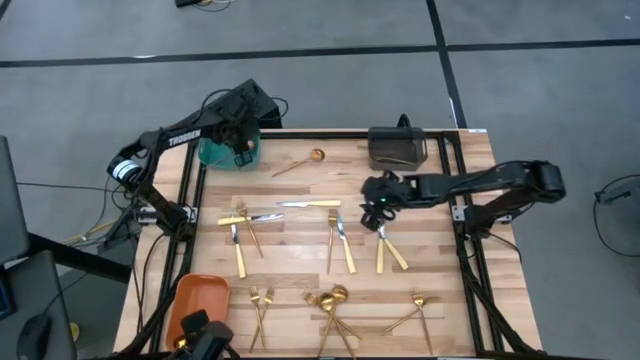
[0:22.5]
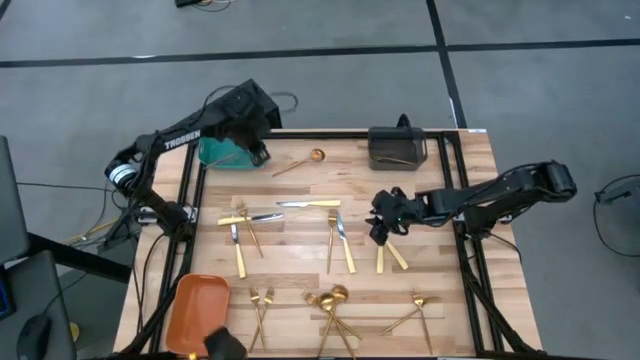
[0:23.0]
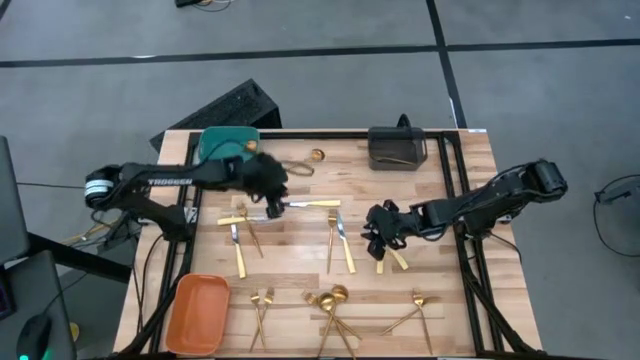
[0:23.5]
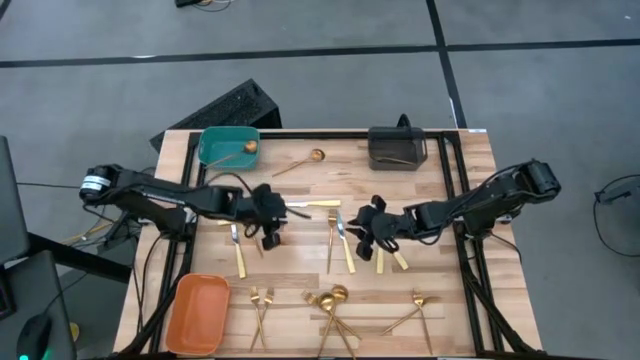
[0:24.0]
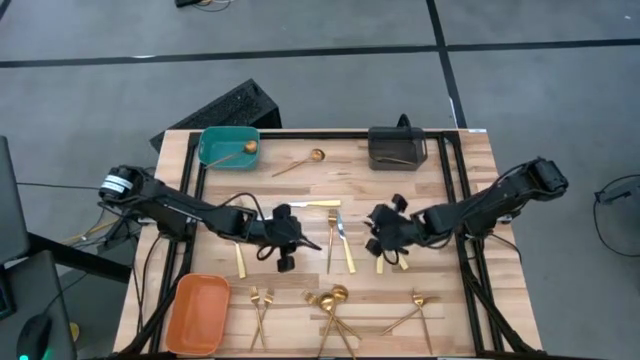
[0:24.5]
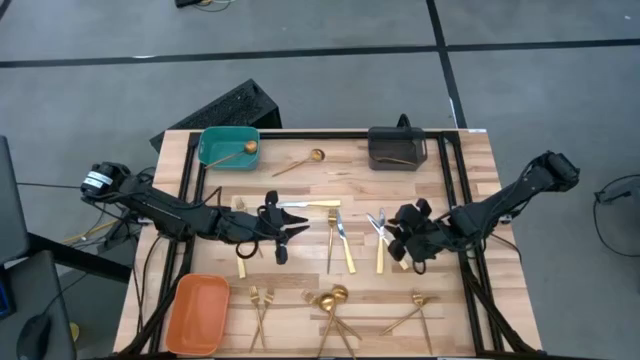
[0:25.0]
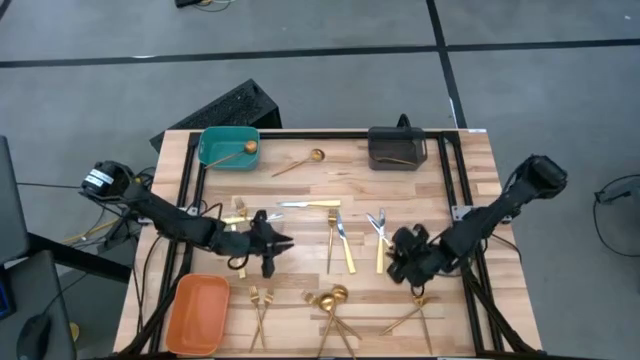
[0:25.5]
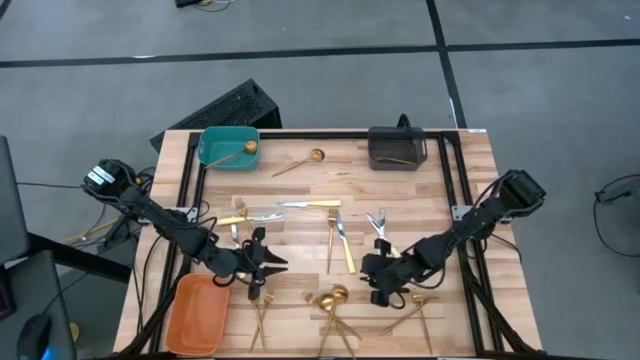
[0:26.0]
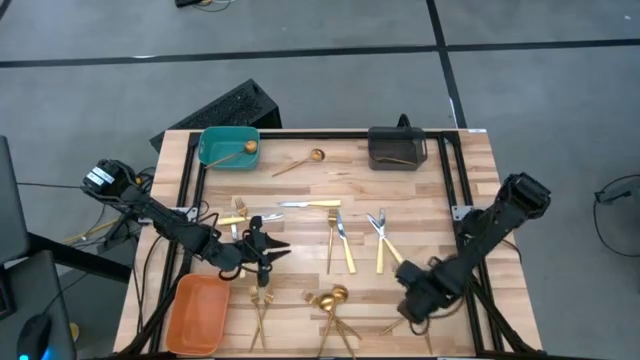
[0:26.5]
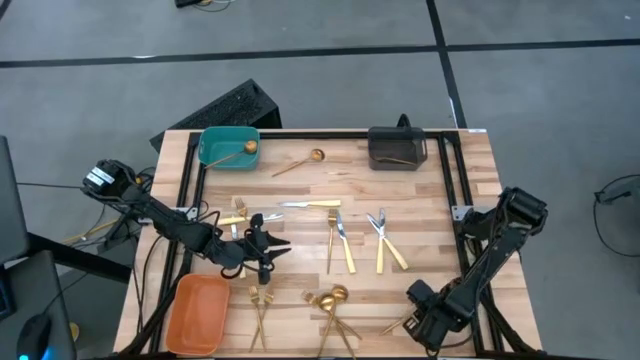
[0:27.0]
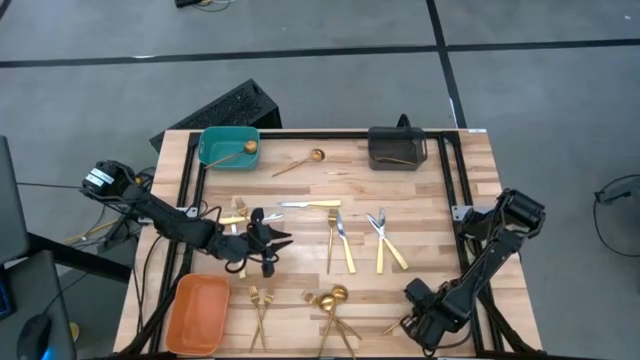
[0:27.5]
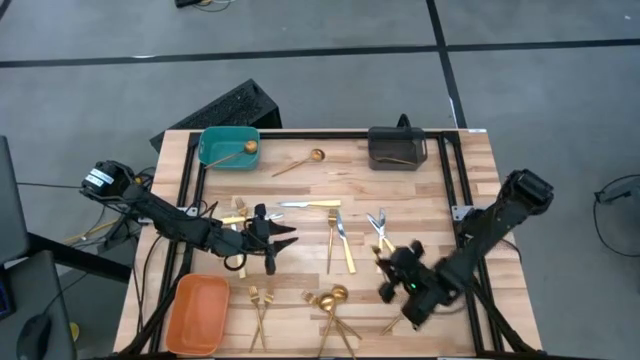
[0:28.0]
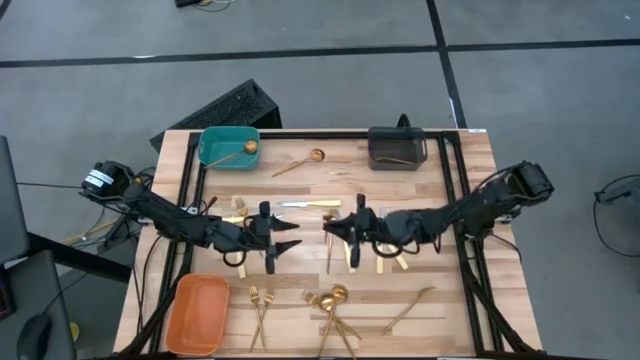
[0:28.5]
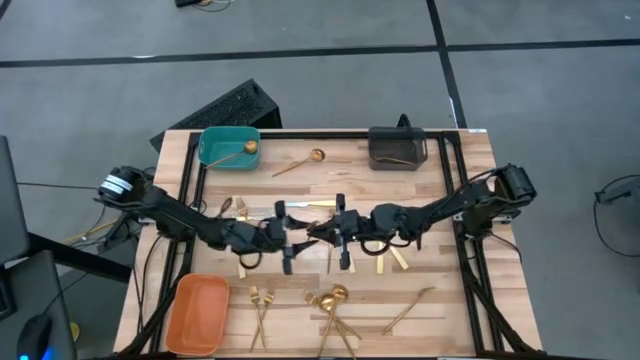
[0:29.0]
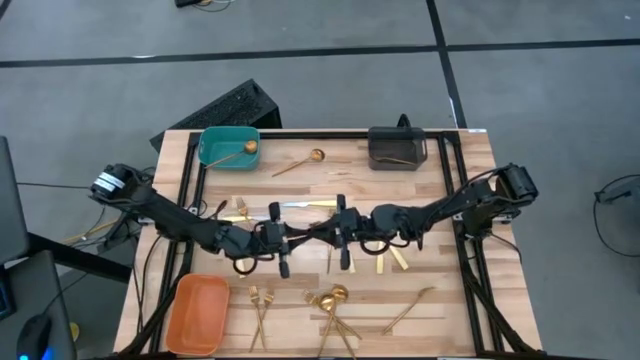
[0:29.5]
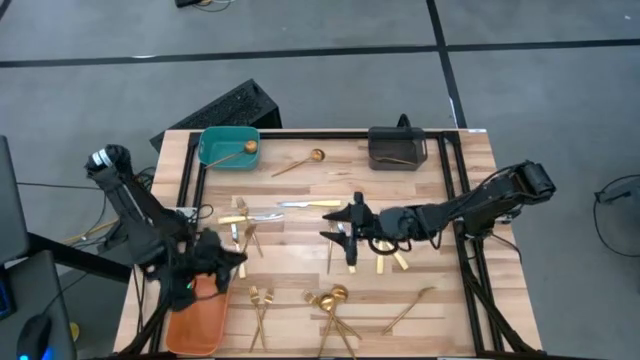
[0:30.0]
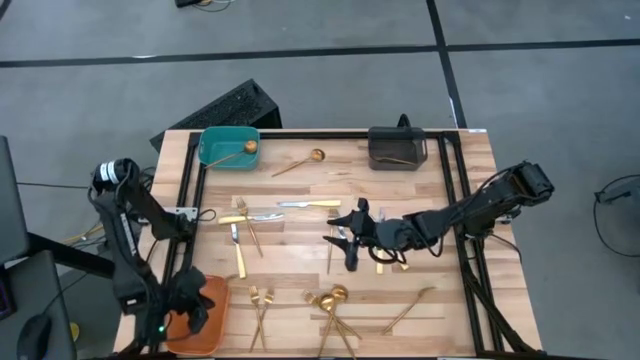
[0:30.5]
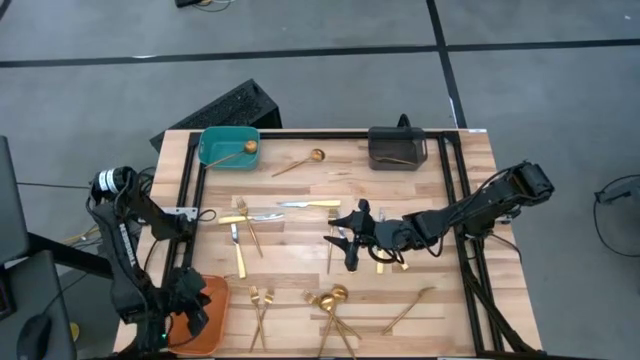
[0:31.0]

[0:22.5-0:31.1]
Task: Sort silverware by color (type)
Put the fork into the orange bin

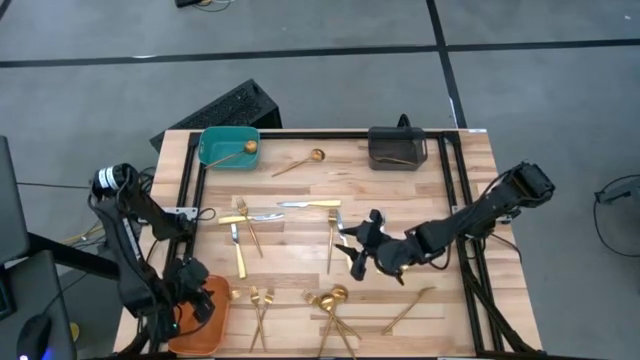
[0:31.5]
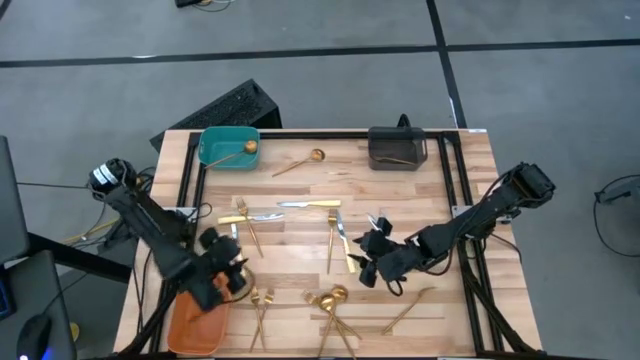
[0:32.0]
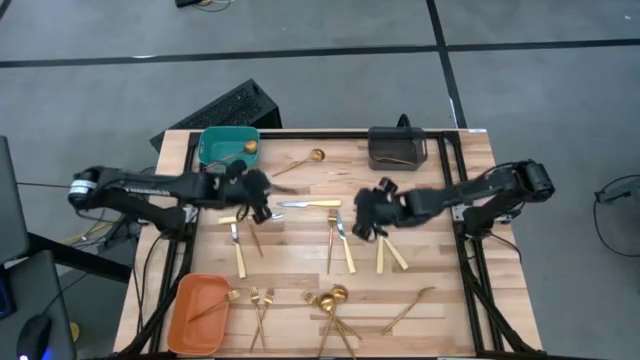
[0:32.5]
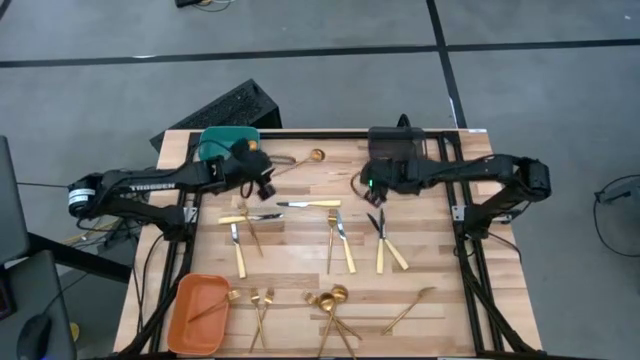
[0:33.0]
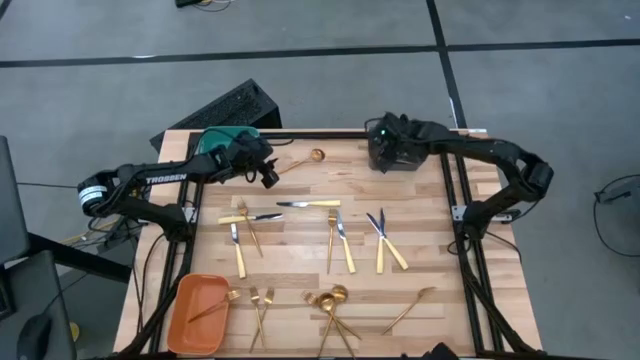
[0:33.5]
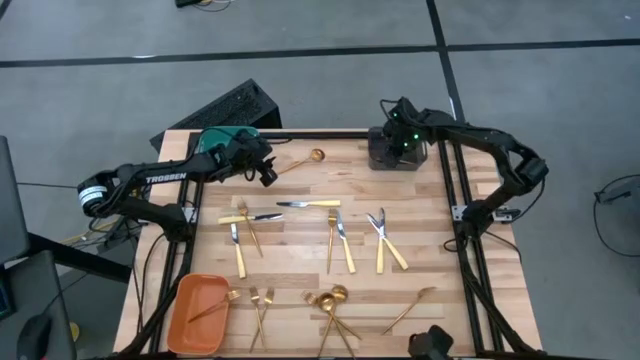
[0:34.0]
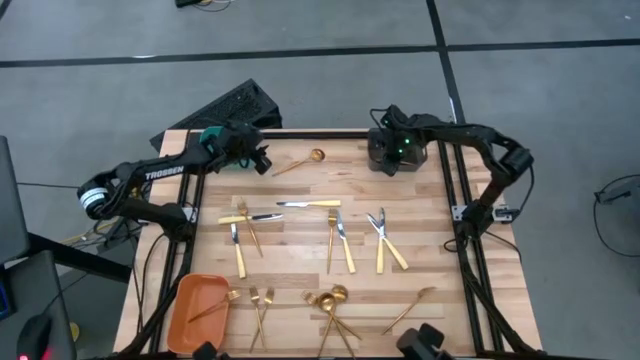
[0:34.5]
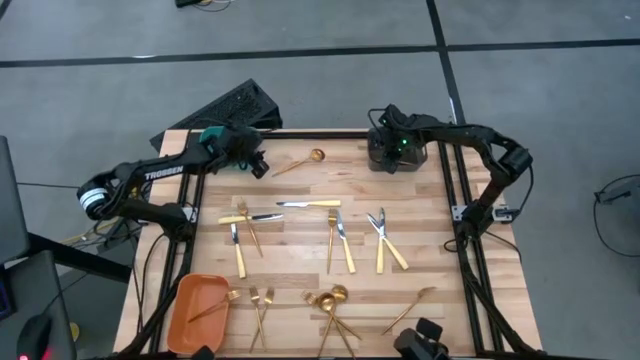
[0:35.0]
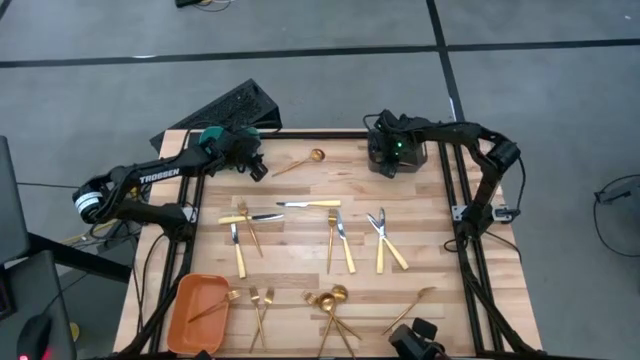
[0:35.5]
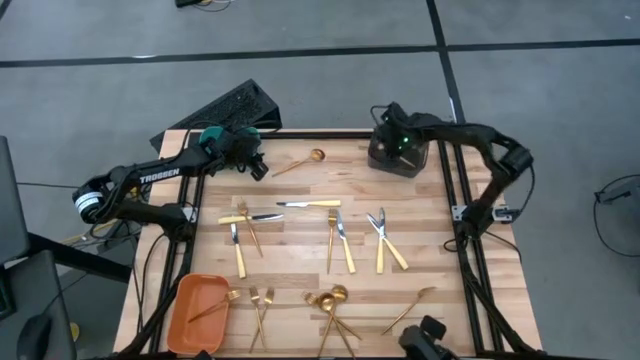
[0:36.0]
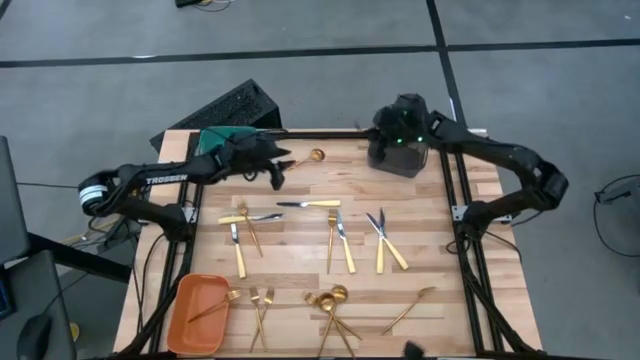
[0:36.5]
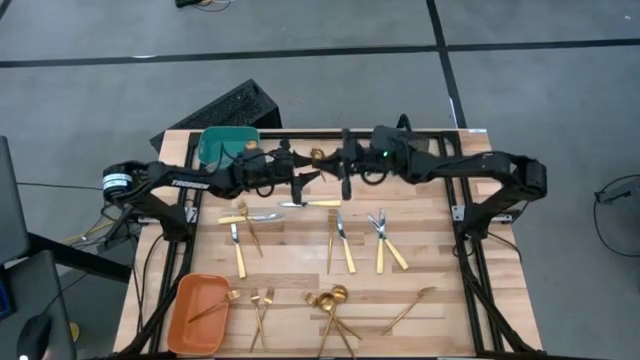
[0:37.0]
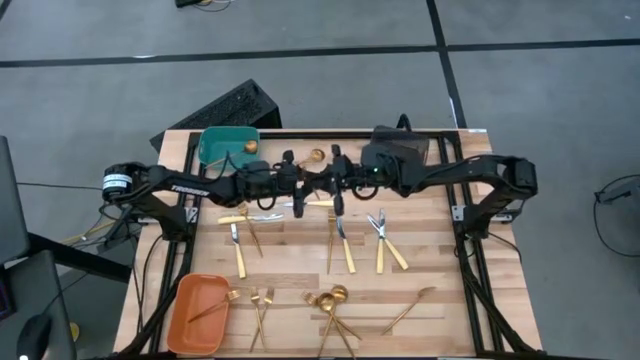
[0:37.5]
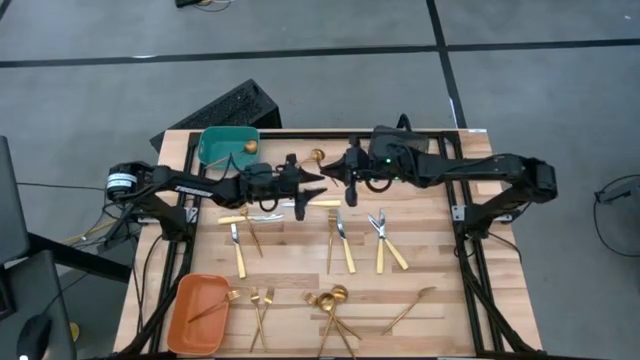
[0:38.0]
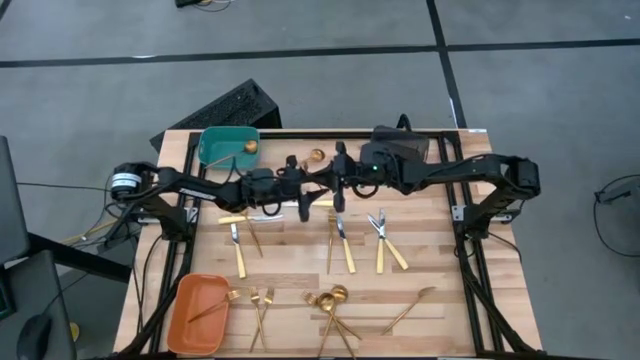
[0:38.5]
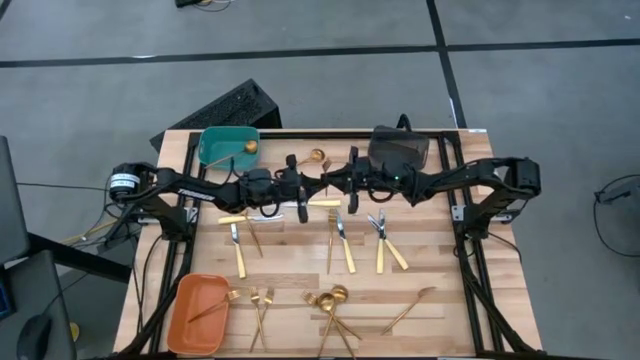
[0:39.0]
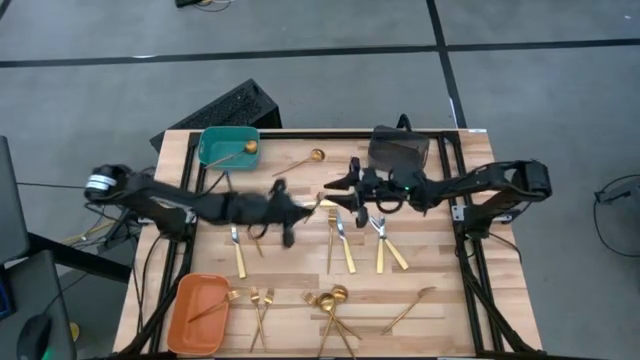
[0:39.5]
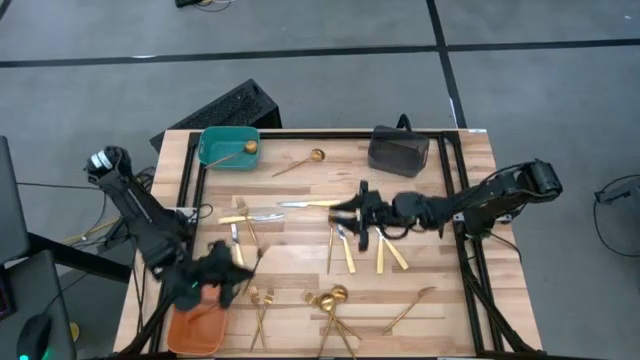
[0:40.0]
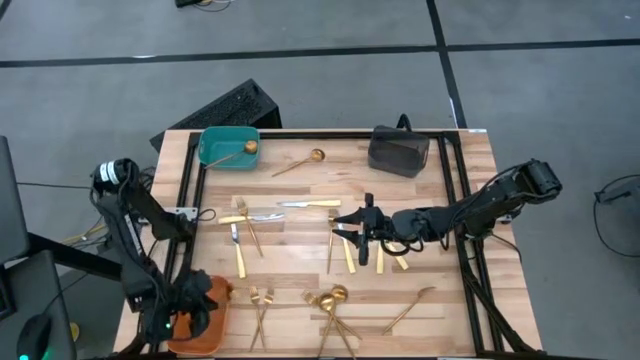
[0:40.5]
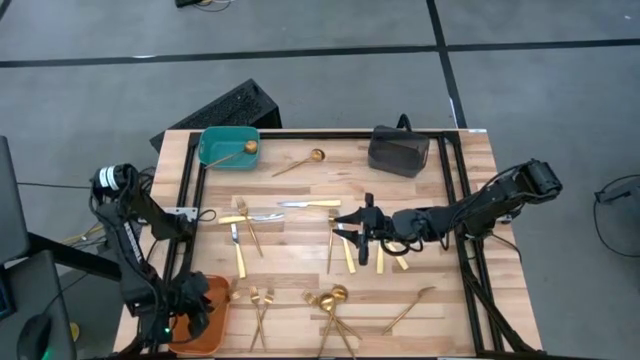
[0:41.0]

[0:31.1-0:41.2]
Put the fork into the orange bin from the black bin

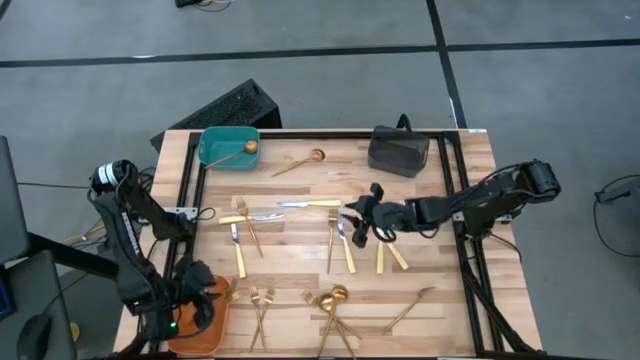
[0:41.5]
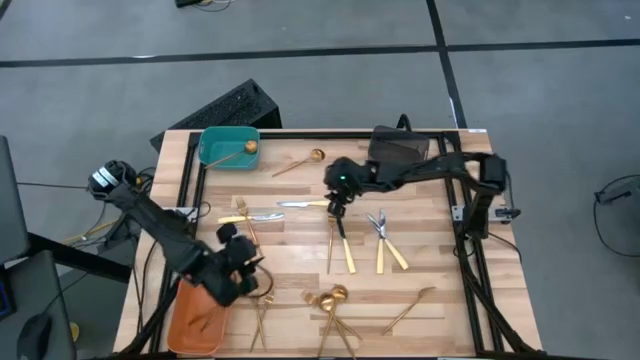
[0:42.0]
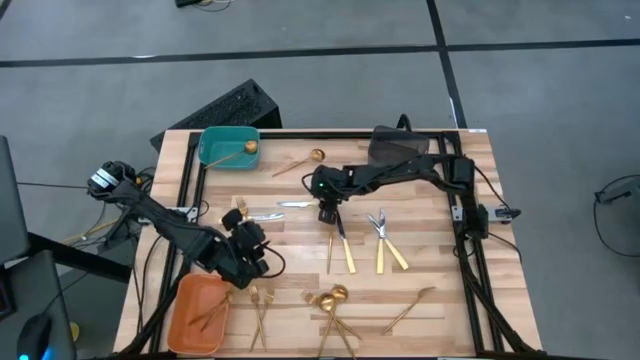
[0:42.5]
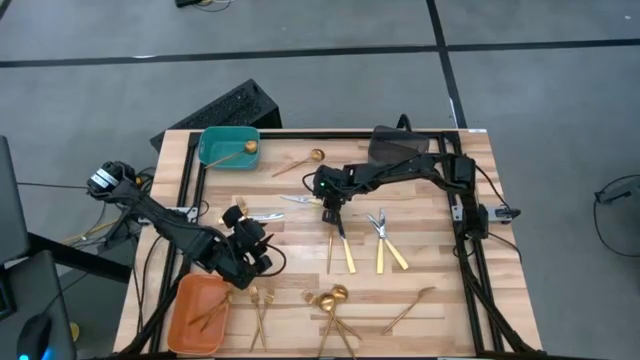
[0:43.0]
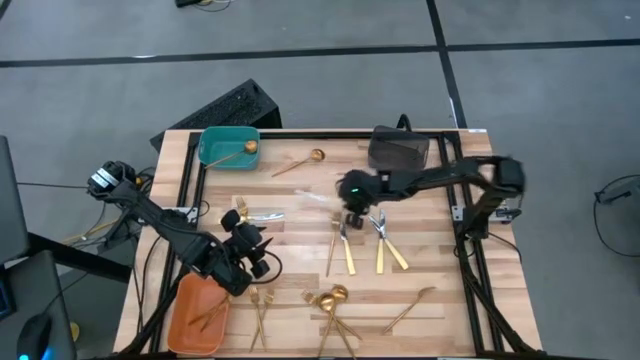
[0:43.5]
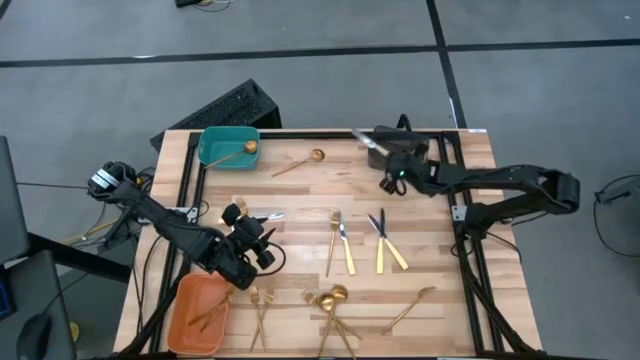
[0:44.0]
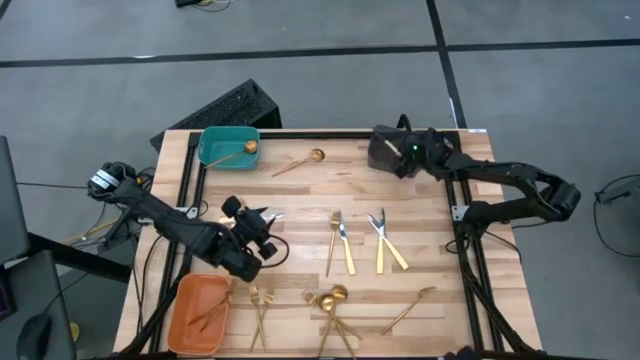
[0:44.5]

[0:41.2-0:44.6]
Put the knife into the black bin
